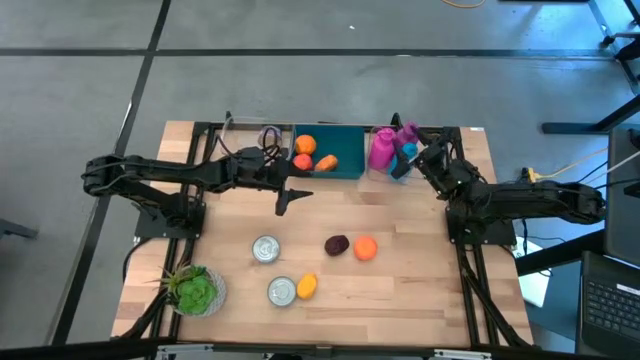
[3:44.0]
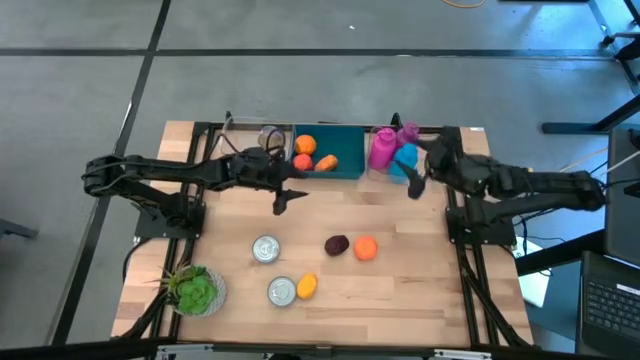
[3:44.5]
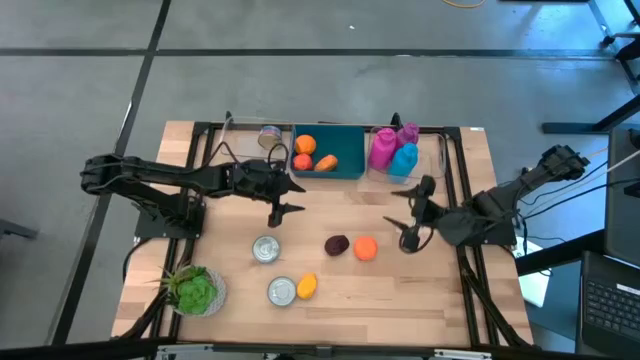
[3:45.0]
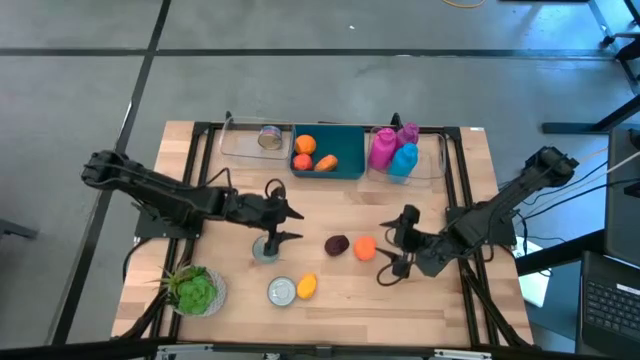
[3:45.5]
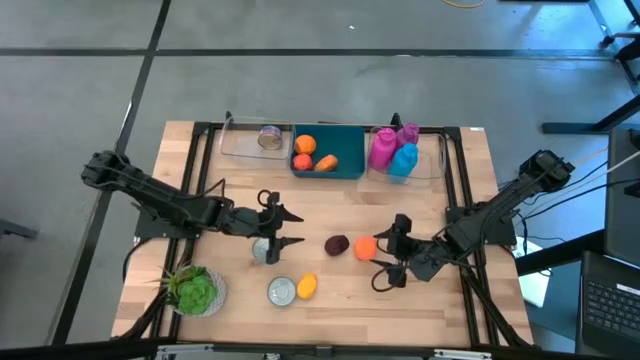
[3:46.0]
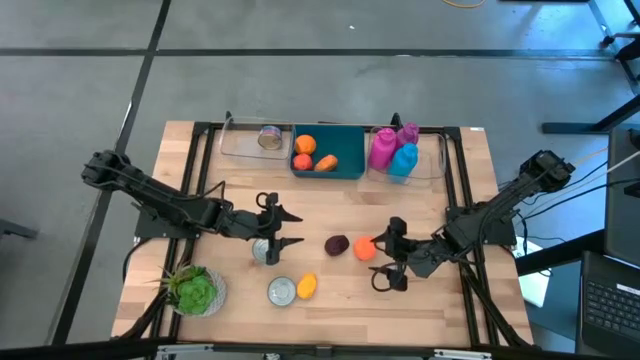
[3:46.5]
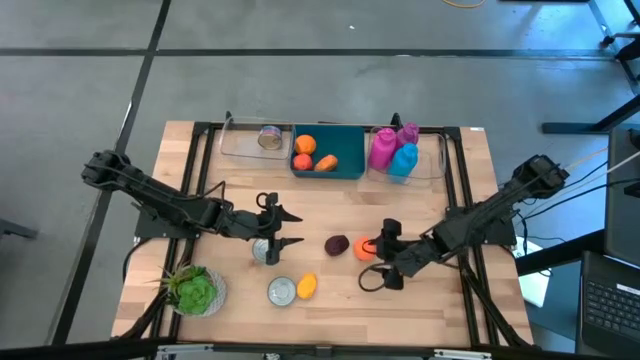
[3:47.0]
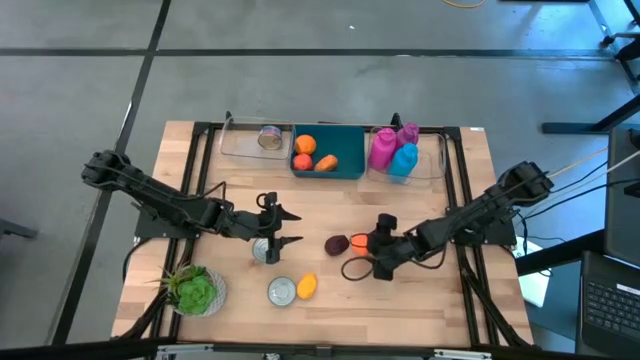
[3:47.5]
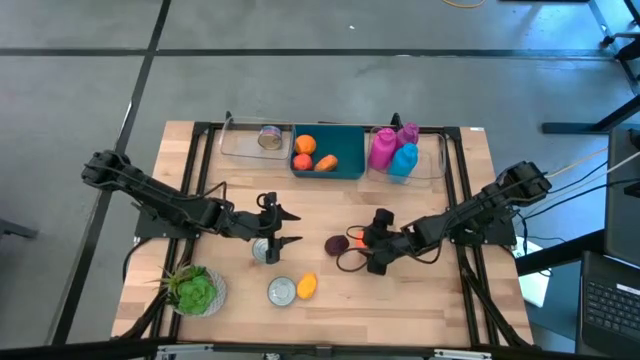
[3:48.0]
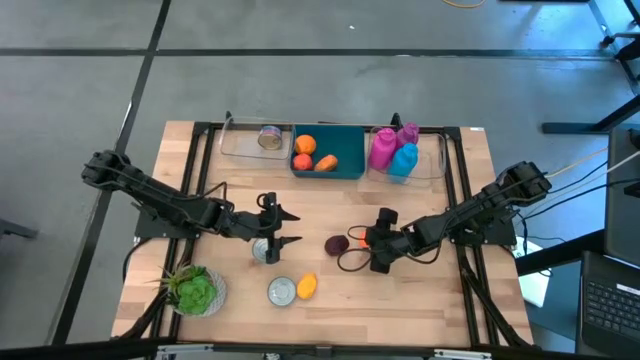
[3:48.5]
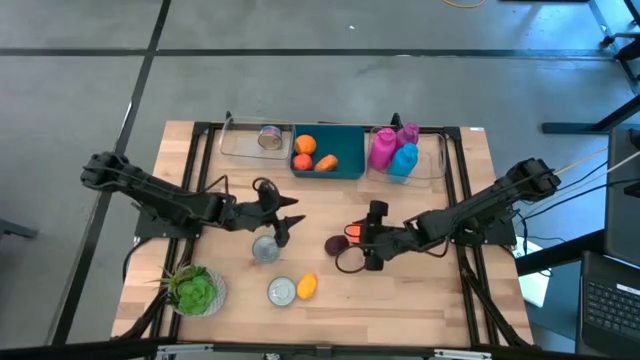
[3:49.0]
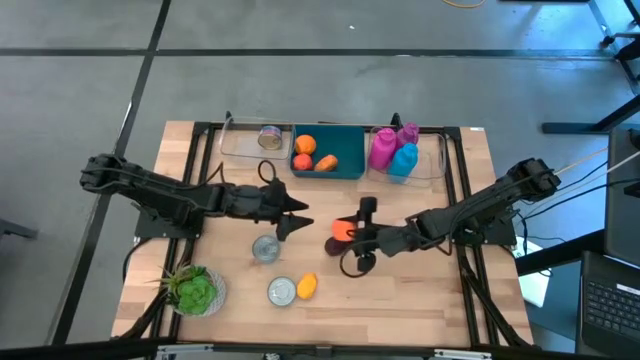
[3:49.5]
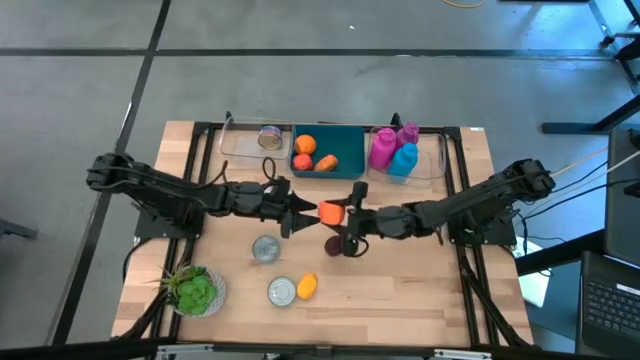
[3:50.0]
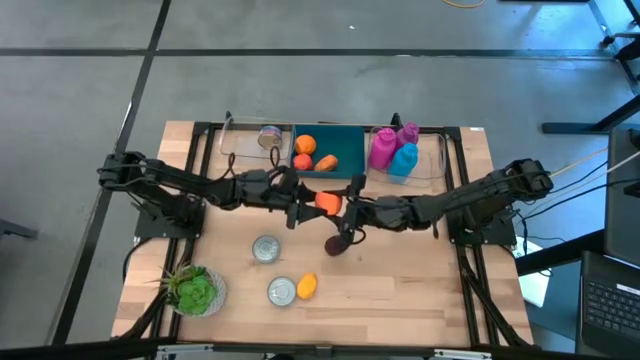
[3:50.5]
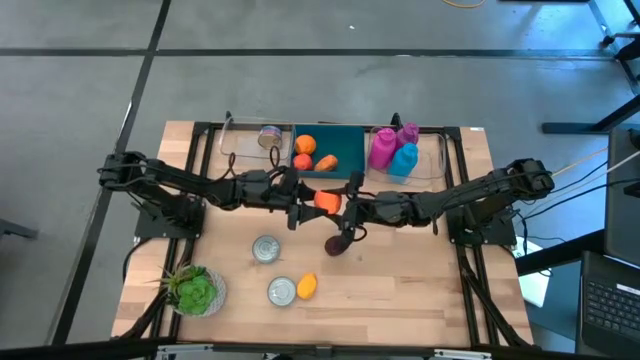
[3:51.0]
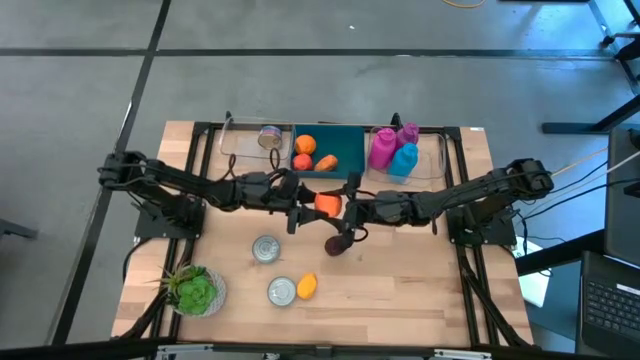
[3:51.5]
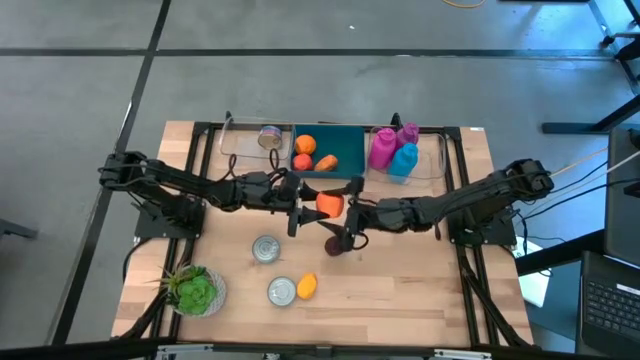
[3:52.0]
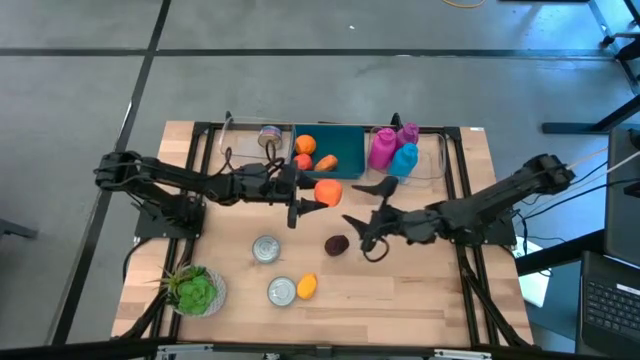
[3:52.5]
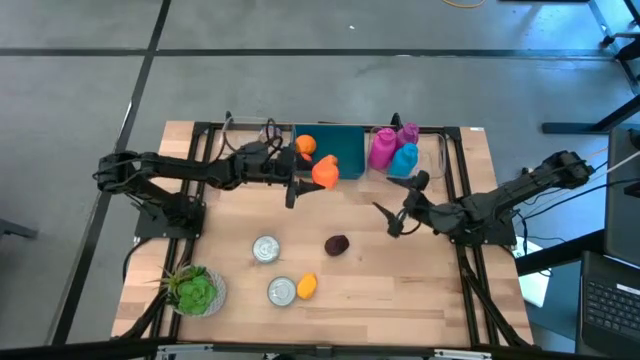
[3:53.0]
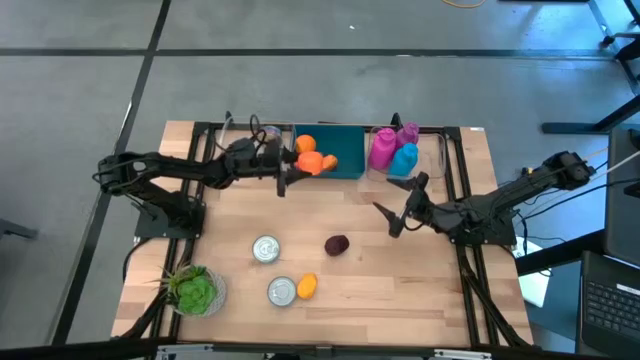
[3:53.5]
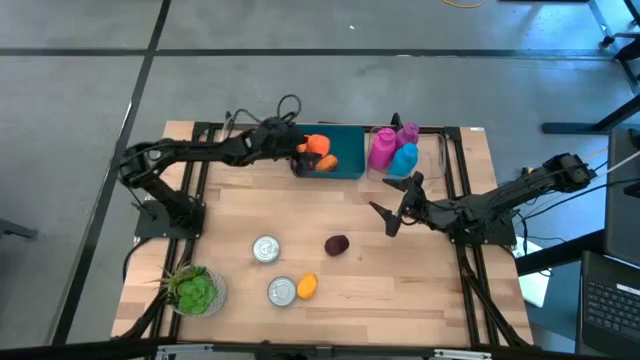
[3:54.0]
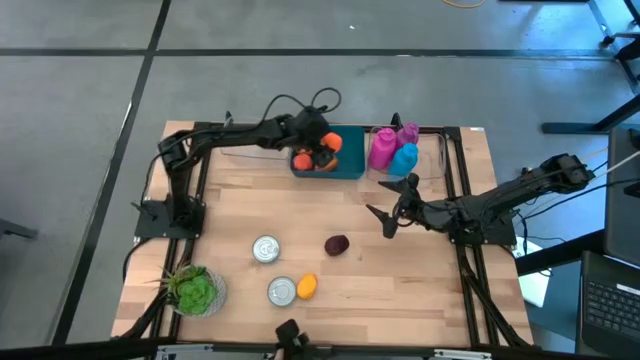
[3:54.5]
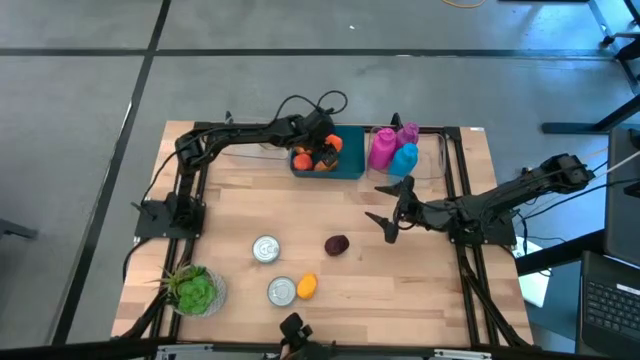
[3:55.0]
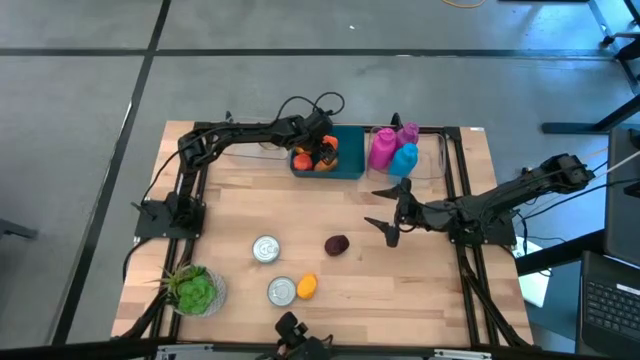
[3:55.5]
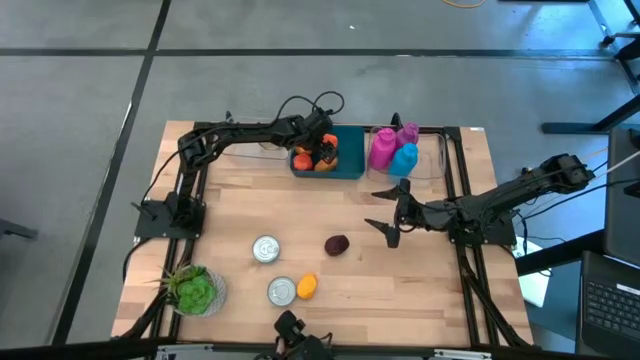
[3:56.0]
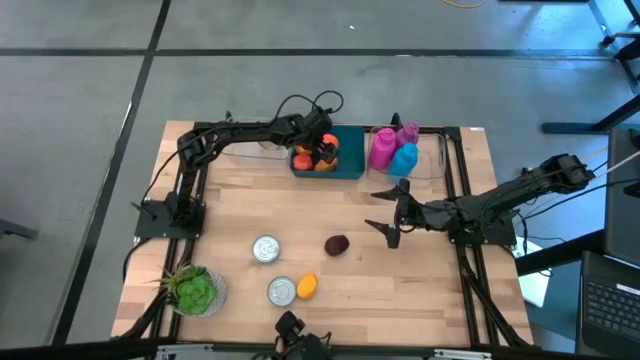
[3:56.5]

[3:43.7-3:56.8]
Task: Pick & Place Food Item
Put the orange into the blue bin

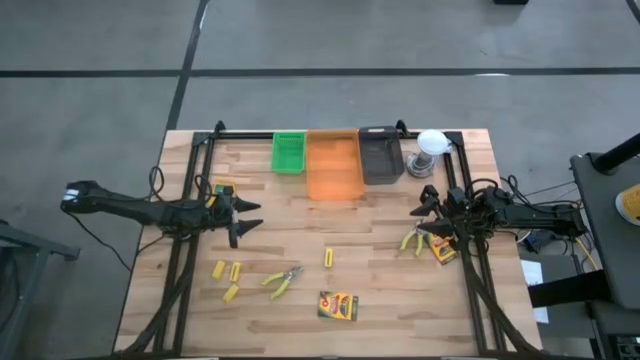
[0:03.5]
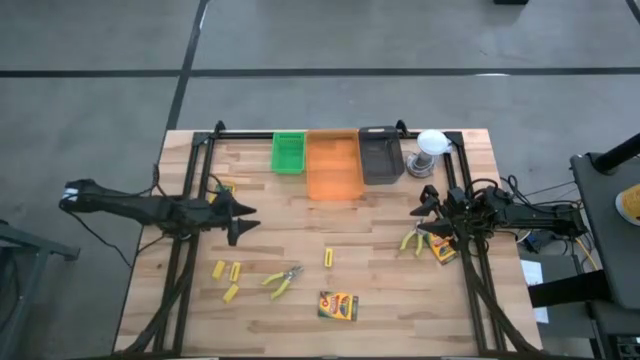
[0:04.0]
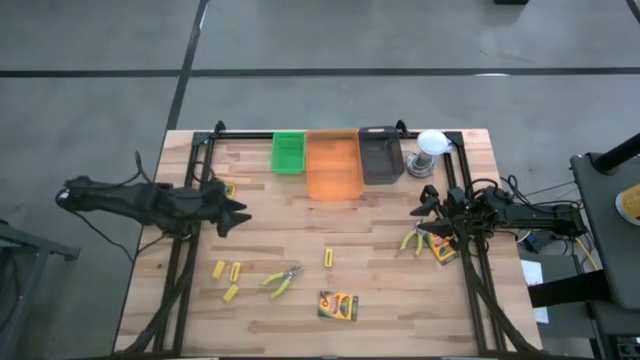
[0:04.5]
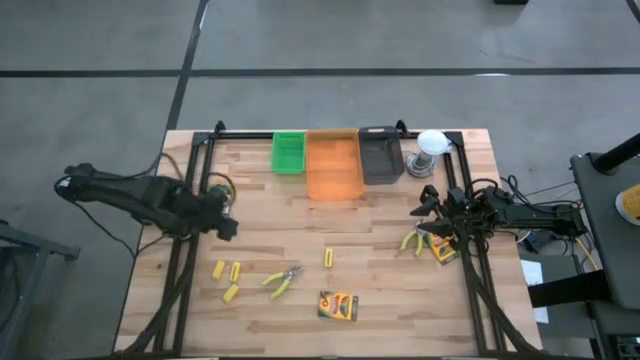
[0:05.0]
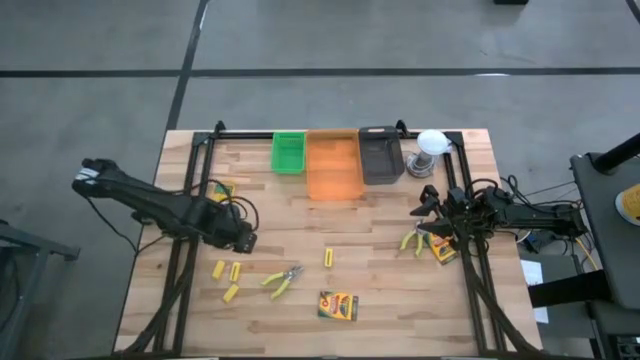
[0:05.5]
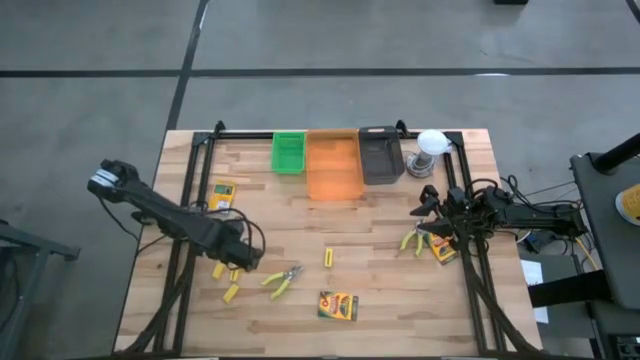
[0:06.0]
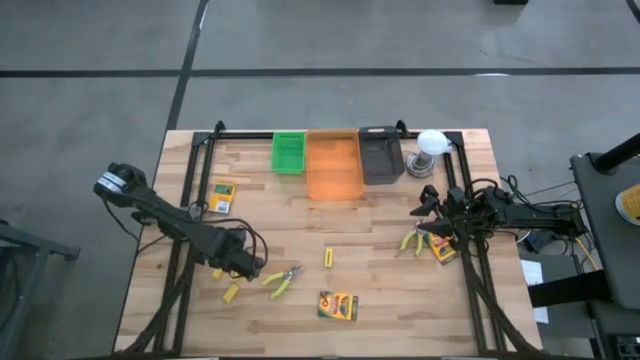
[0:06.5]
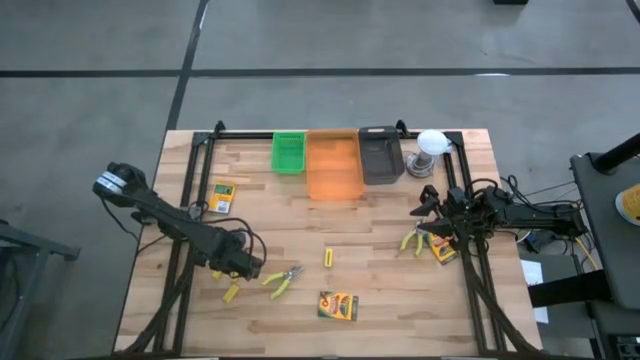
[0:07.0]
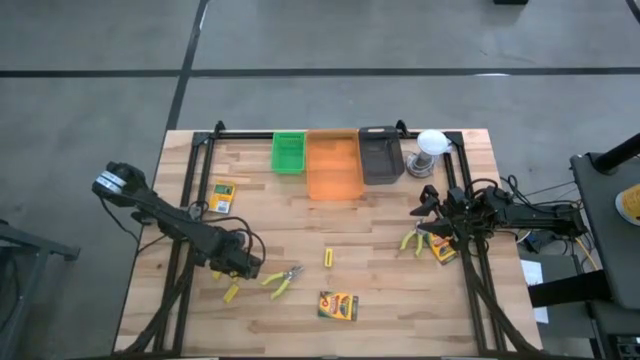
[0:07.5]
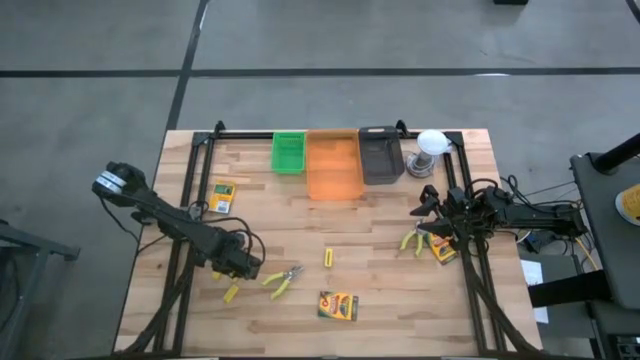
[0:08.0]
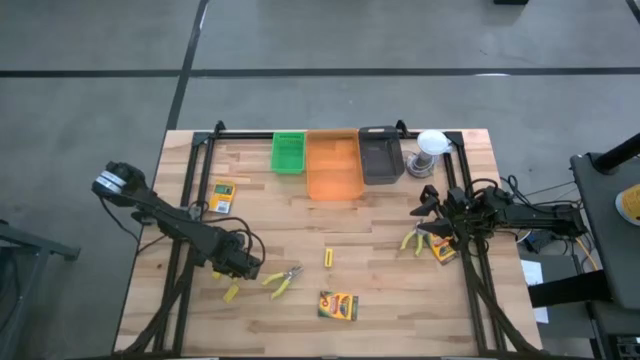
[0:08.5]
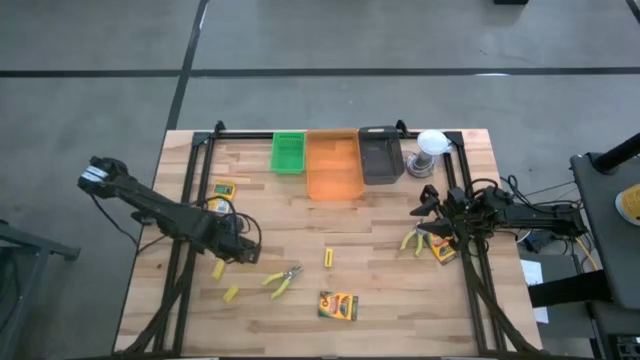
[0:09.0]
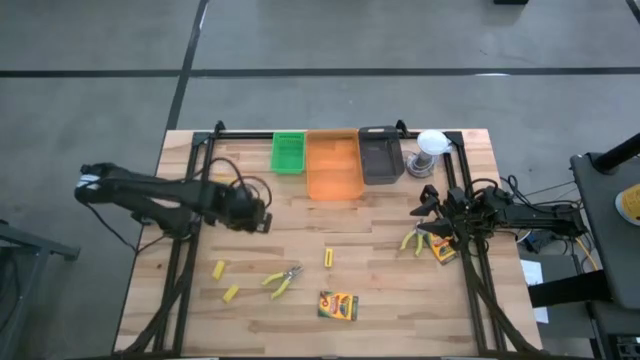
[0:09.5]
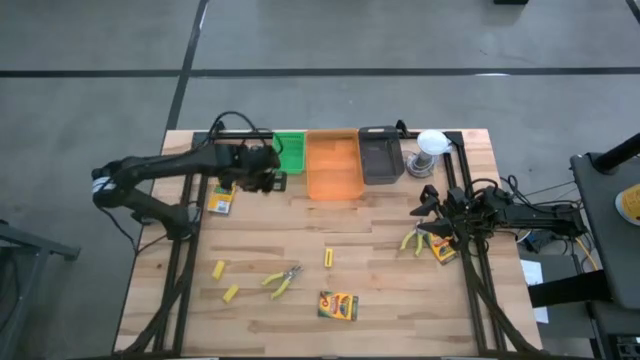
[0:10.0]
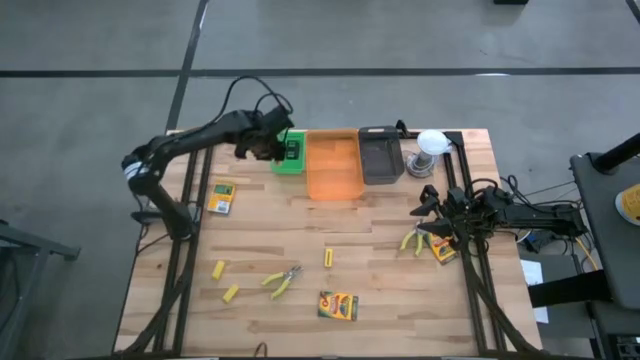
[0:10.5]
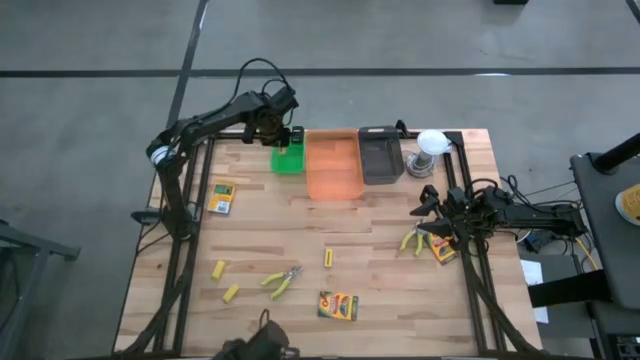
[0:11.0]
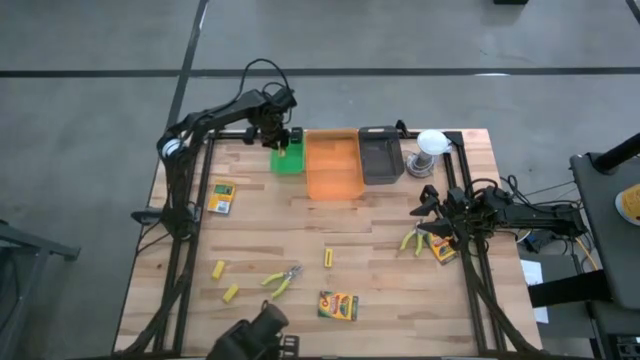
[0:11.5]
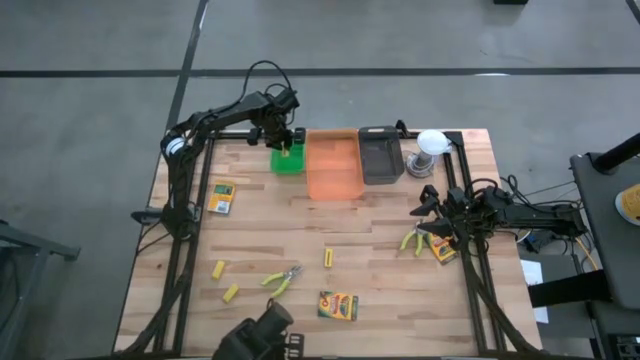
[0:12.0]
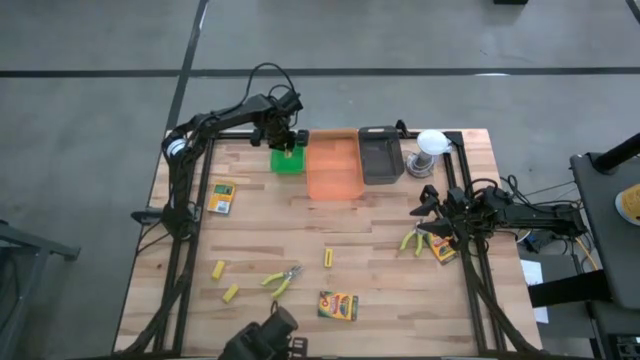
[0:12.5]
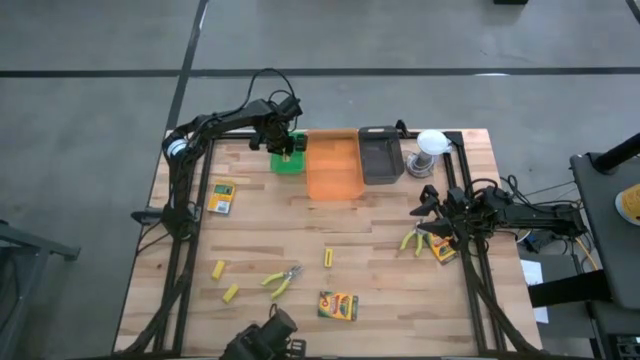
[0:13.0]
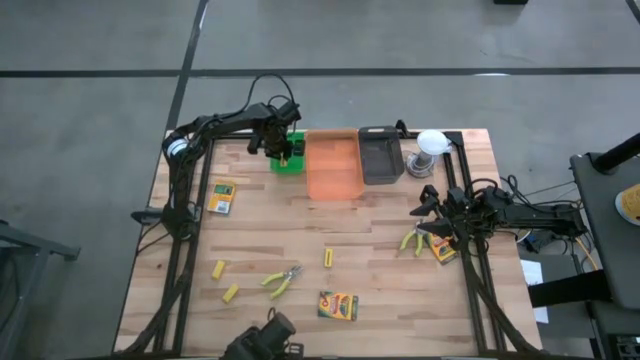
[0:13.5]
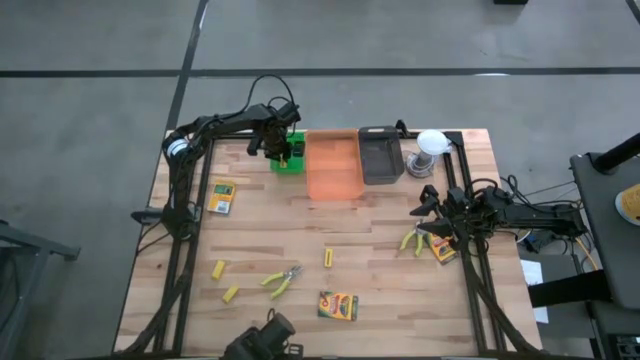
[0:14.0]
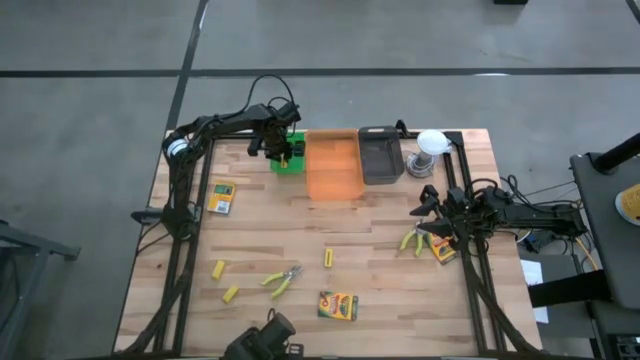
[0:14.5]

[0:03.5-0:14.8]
Task: Pick & Place School Supplies
Put the yellow eraser into the green bin
